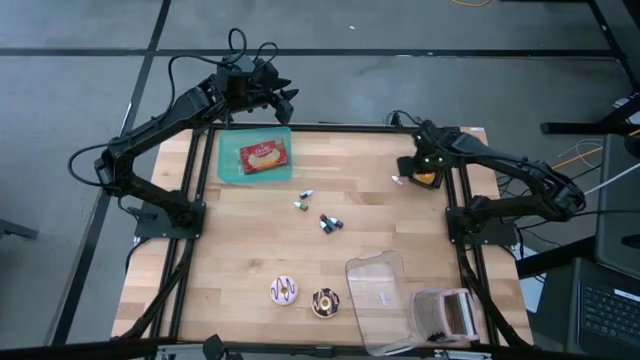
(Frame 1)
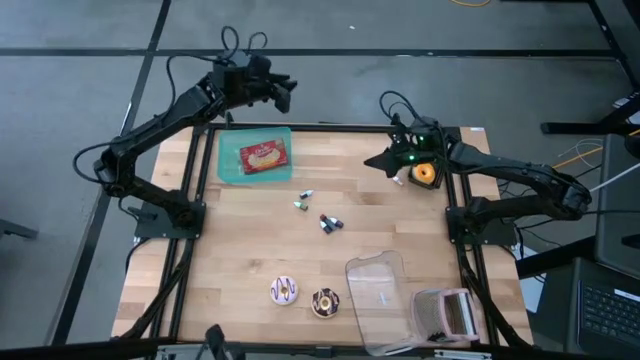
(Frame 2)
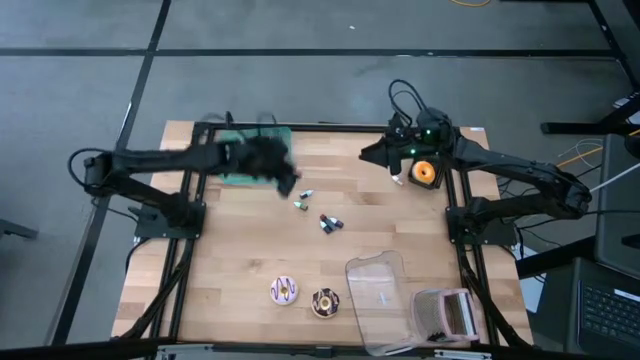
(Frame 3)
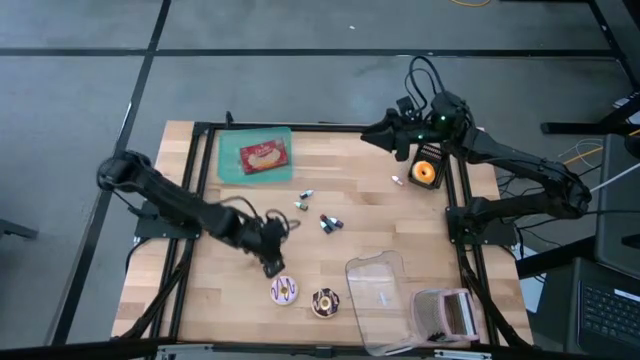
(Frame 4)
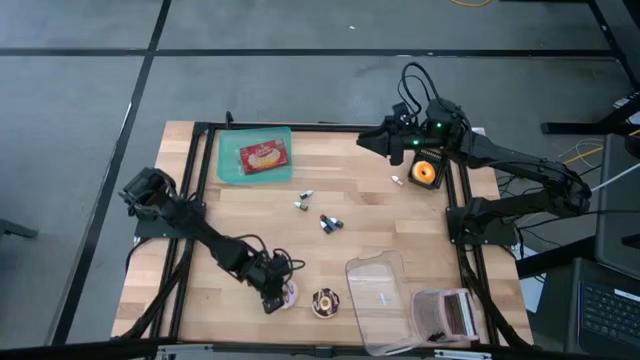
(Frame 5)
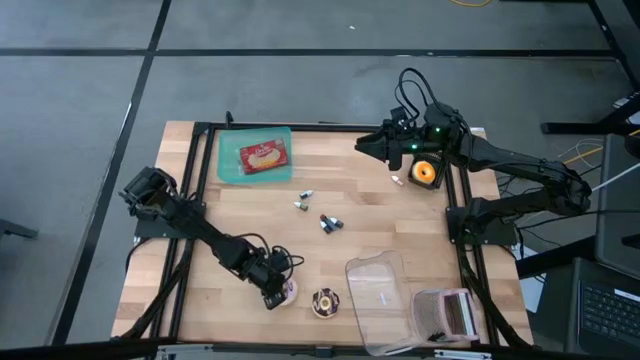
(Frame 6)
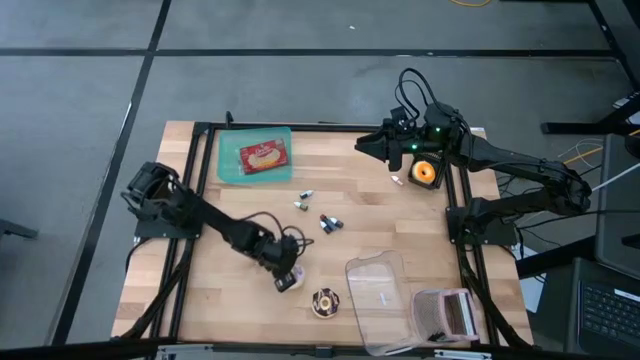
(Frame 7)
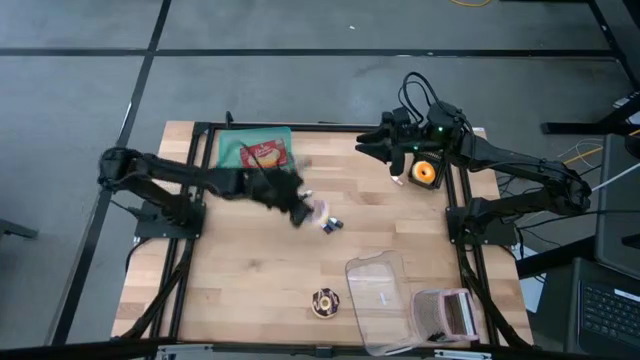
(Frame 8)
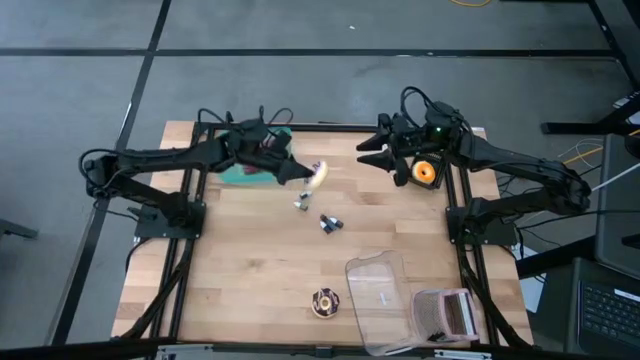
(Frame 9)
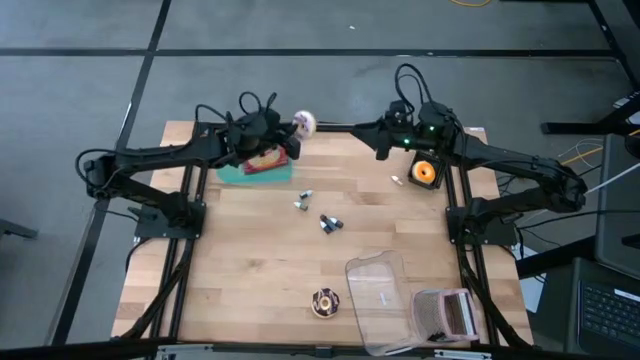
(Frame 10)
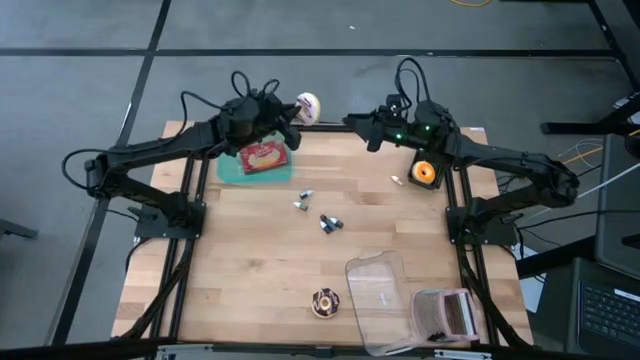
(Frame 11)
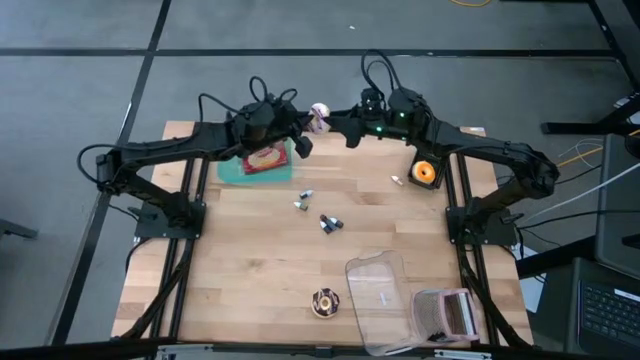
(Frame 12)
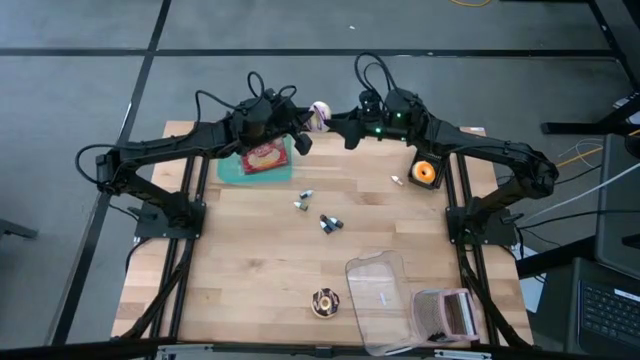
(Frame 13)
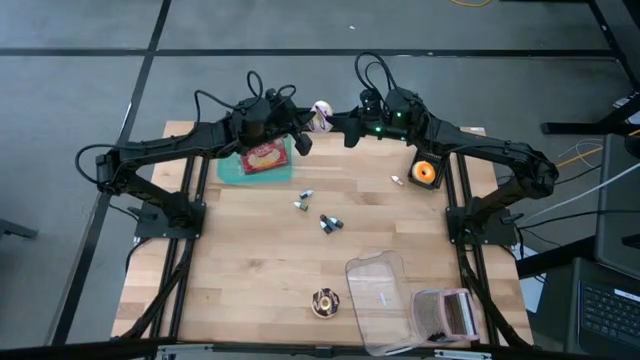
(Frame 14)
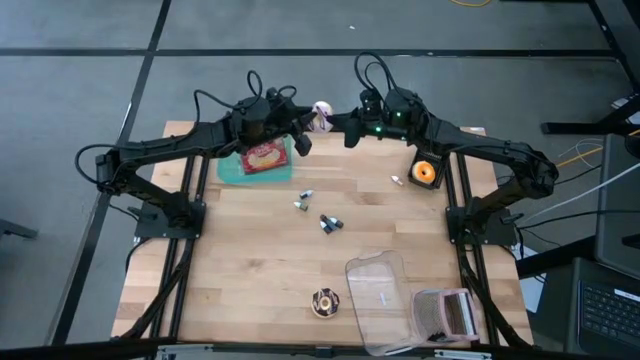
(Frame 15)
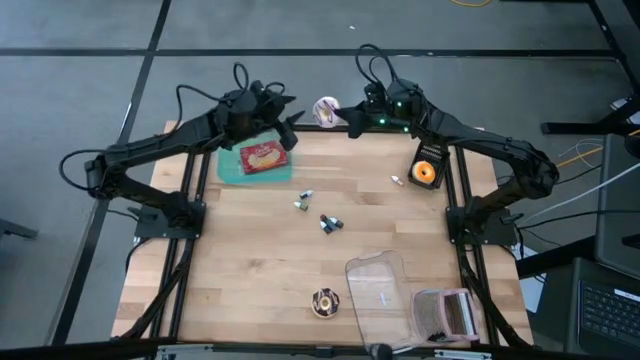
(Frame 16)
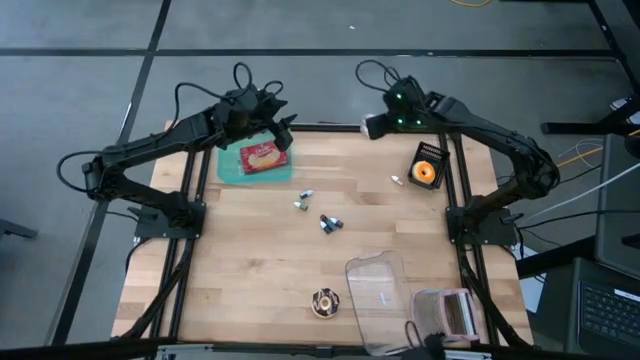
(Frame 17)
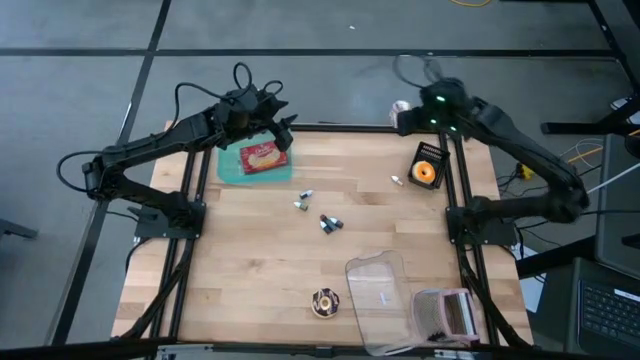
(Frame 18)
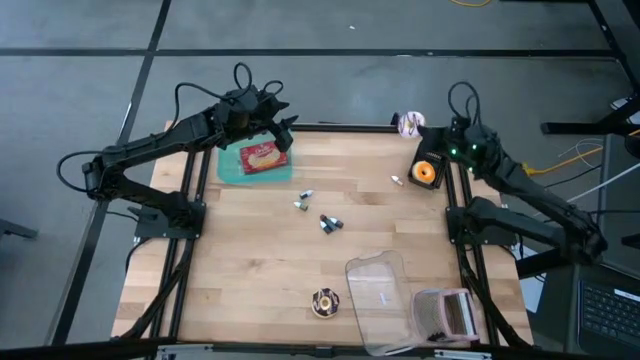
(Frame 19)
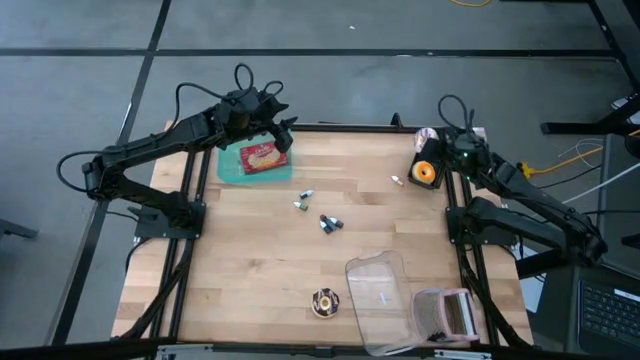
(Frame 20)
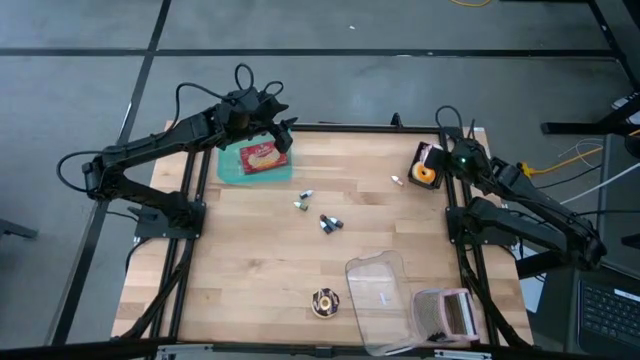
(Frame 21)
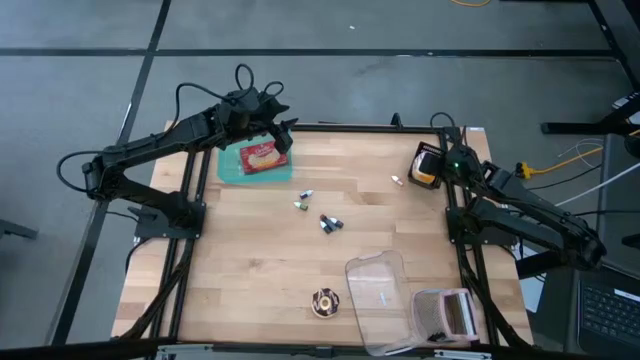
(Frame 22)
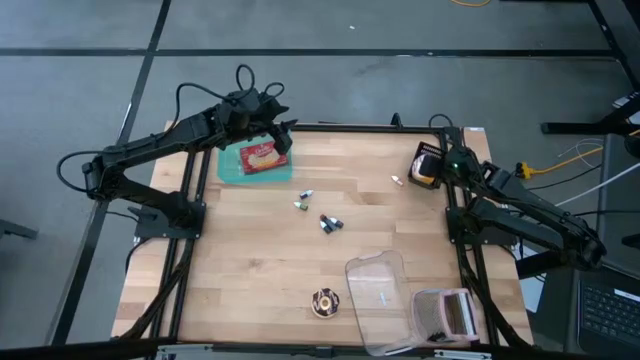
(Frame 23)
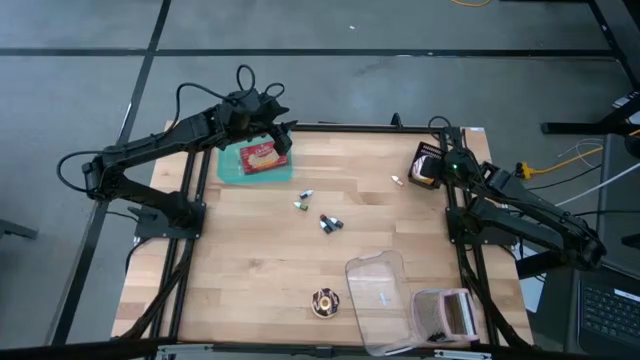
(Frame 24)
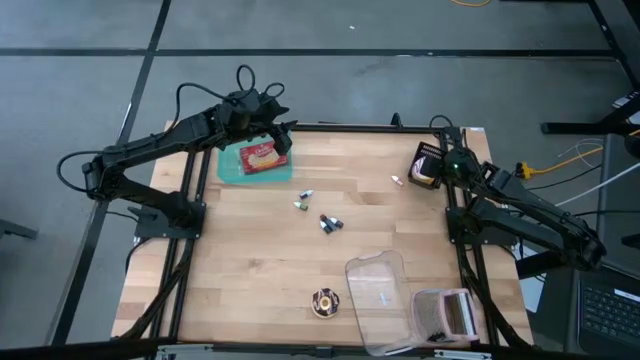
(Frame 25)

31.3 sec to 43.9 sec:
Put the purple donut into the black bin
